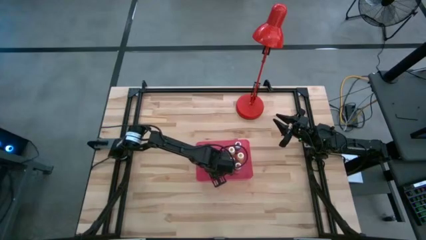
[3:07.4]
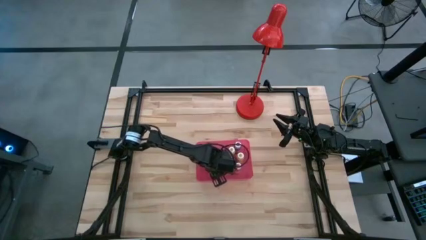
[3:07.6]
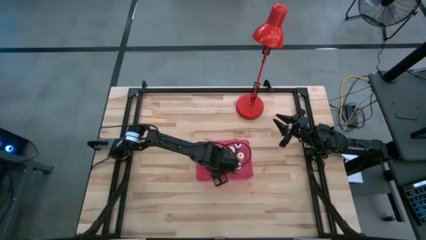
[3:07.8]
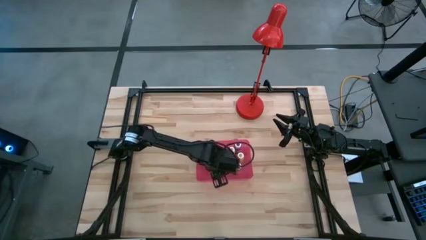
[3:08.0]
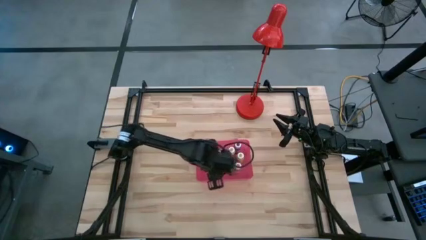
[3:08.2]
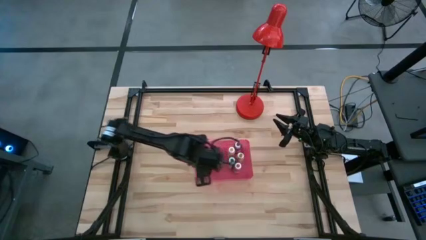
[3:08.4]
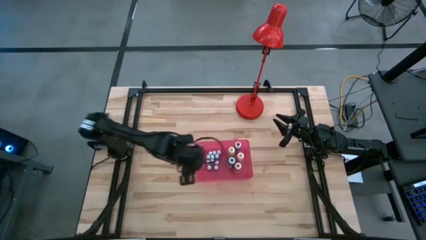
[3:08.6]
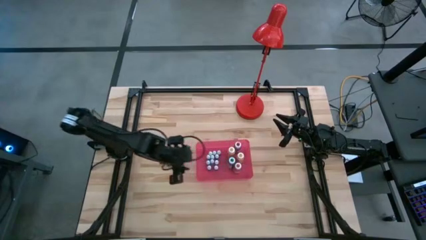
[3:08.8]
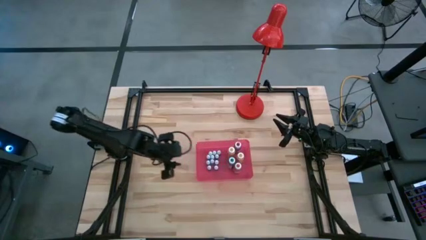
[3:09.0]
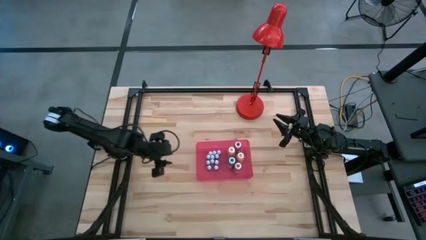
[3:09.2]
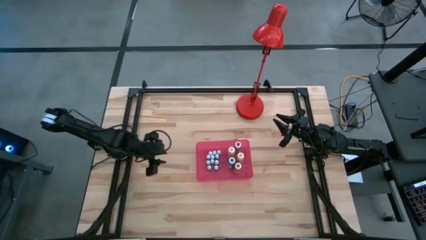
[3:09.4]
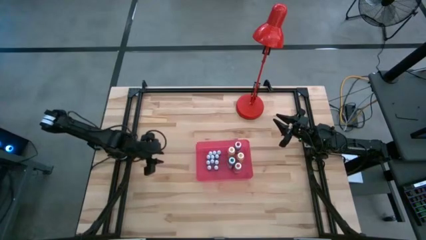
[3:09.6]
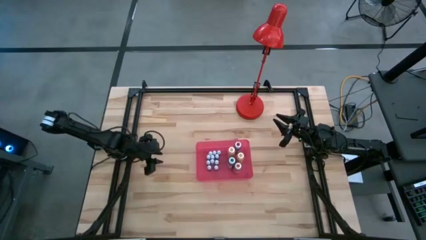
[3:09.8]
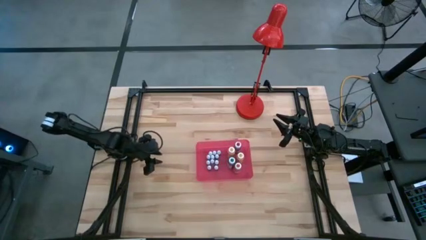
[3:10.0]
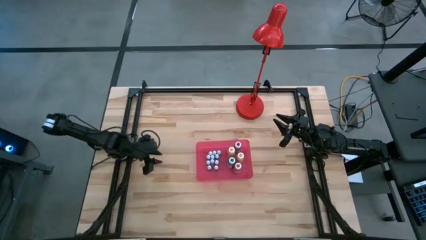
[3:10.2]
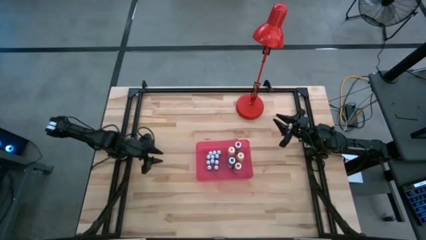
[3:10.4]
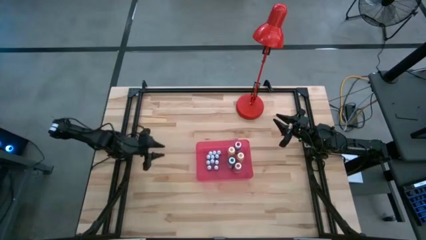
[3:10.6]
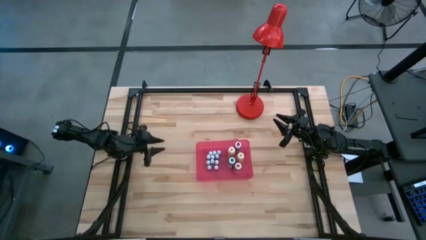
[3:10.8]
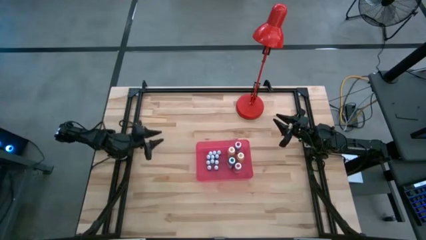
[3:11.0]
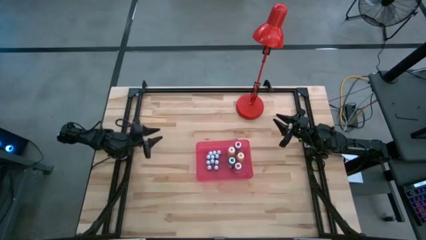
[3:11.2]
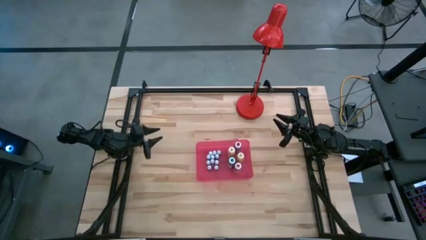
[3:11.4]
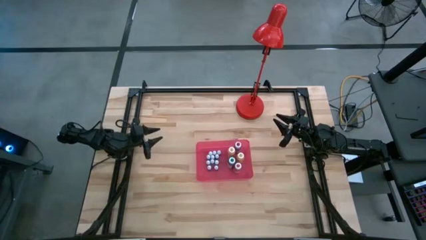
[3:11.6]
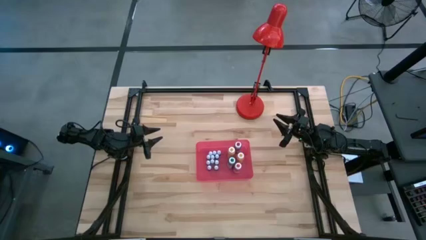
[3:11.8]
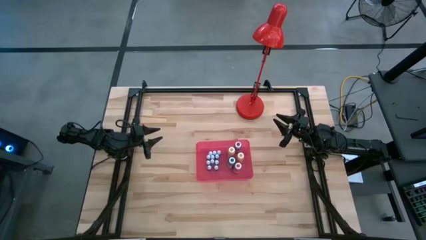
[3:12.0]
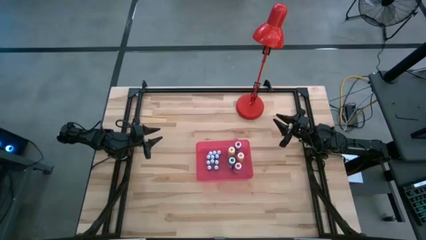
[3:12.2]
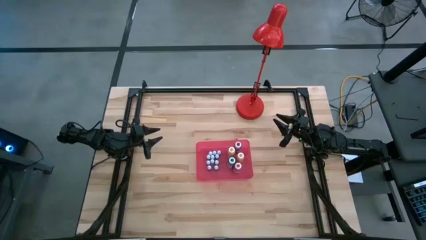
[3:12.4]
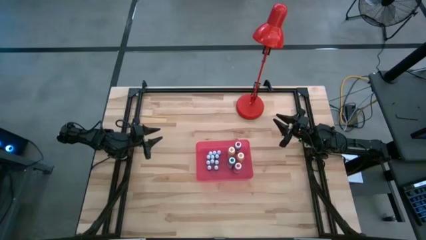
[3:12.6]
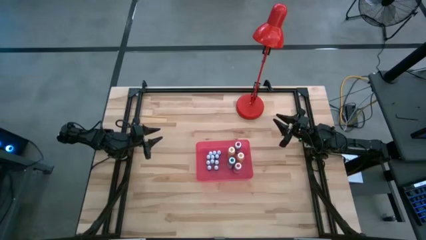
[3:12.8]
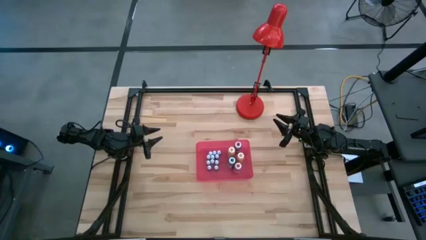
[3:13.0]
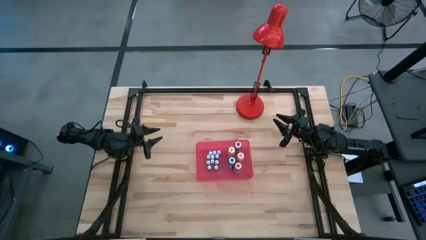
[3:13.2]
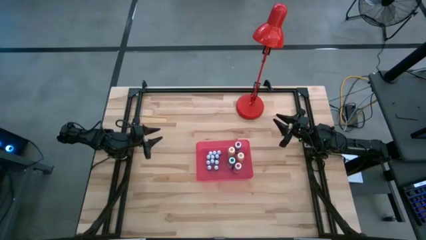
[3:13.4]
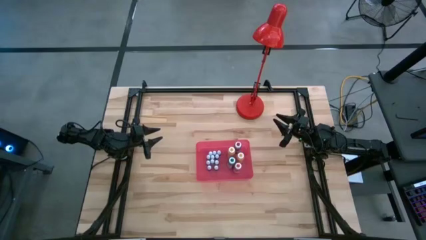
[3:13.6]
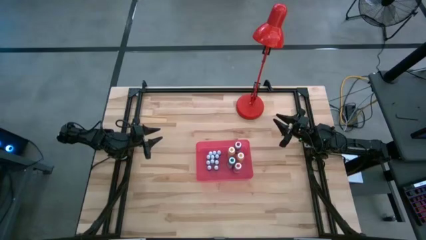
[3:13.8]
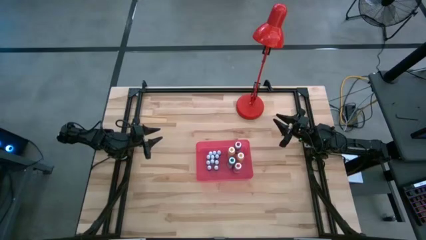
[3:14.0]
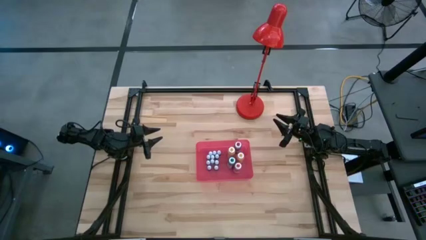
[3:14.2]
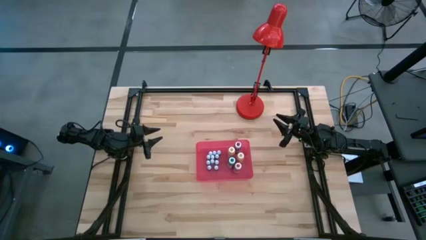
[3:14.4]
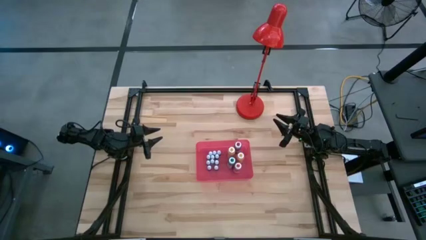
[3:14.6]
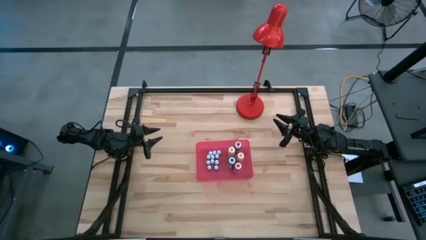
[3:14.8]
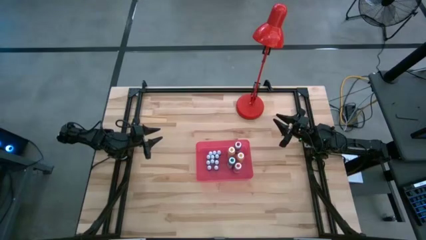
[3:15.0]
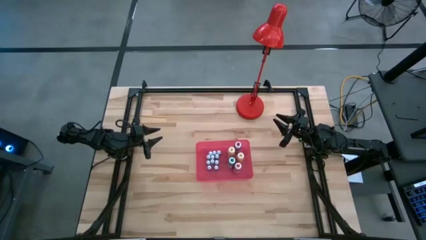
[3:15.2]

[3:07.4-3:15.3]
Task: Pick & Place food coloring
Return to Home Position

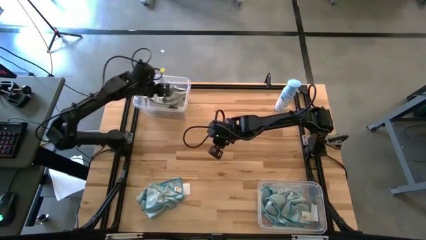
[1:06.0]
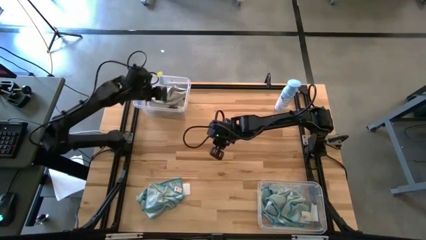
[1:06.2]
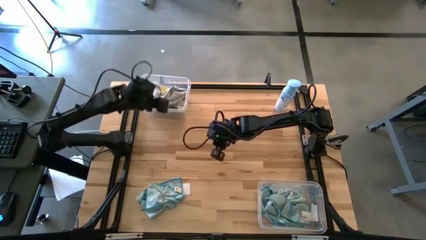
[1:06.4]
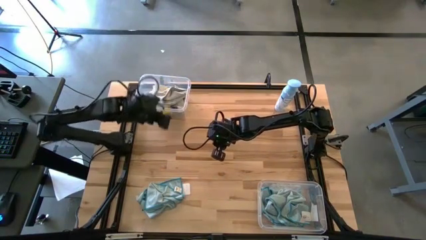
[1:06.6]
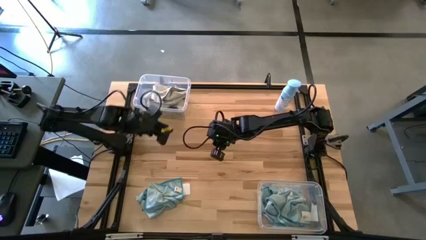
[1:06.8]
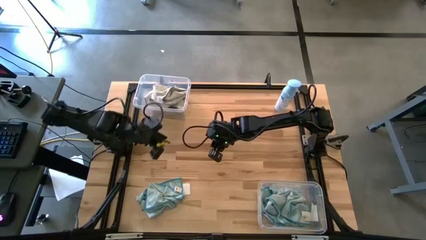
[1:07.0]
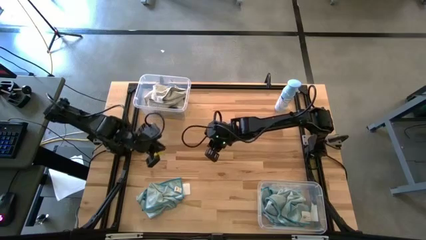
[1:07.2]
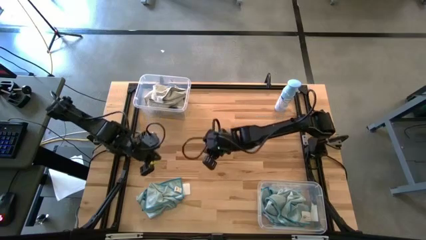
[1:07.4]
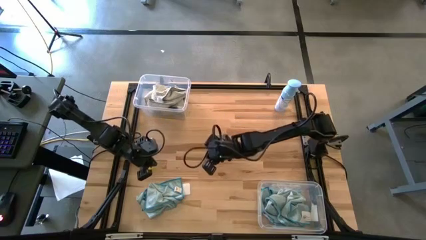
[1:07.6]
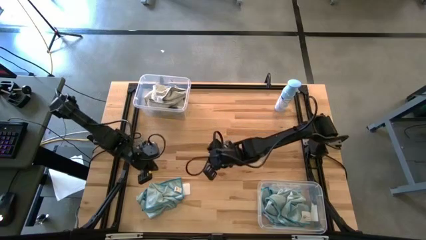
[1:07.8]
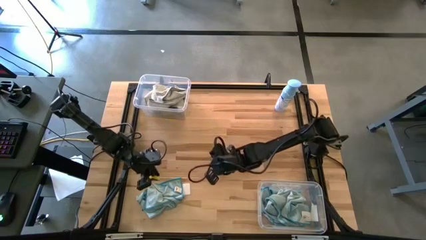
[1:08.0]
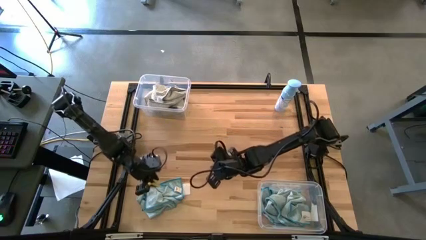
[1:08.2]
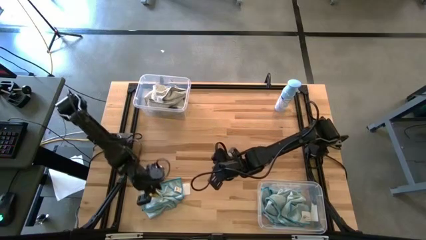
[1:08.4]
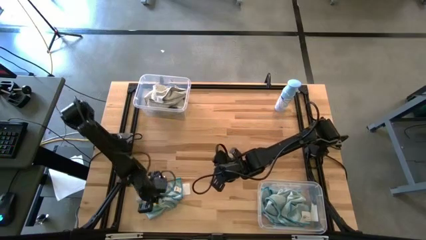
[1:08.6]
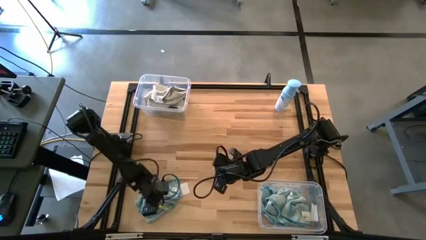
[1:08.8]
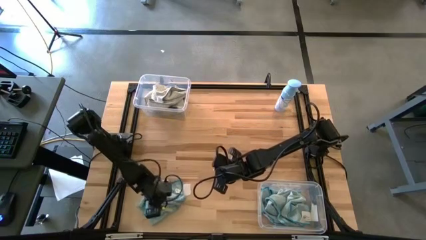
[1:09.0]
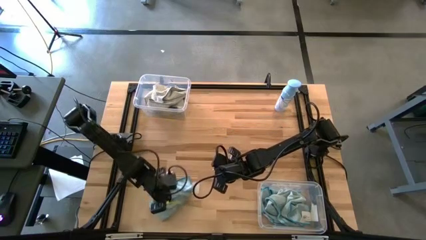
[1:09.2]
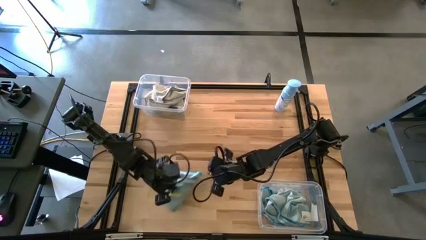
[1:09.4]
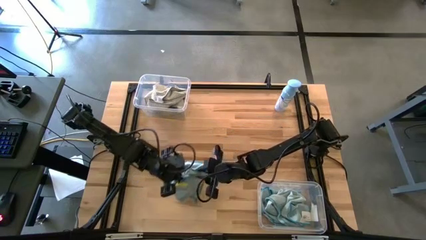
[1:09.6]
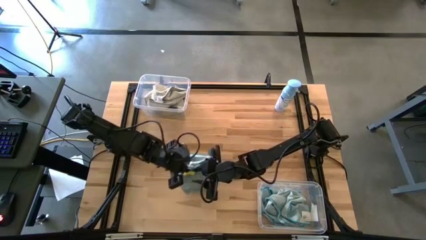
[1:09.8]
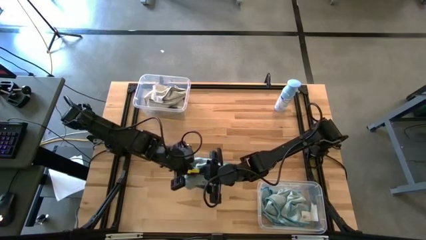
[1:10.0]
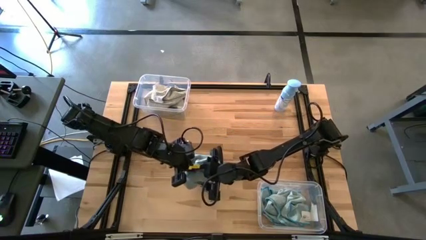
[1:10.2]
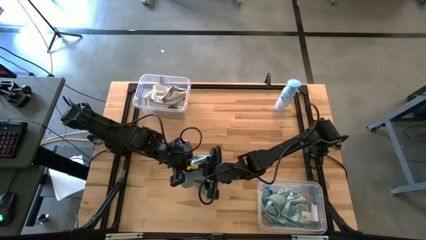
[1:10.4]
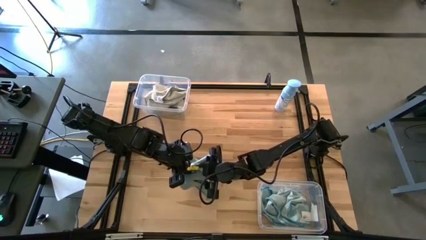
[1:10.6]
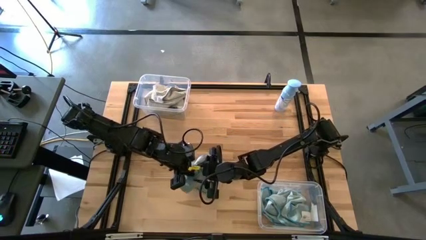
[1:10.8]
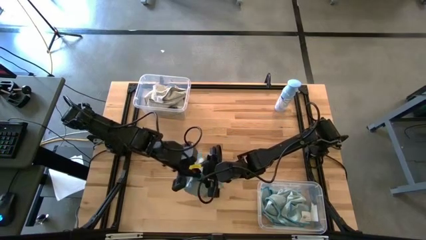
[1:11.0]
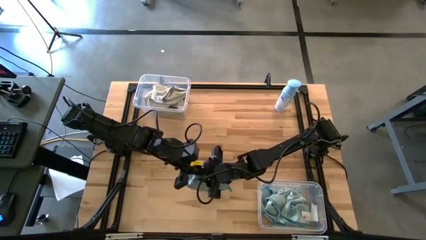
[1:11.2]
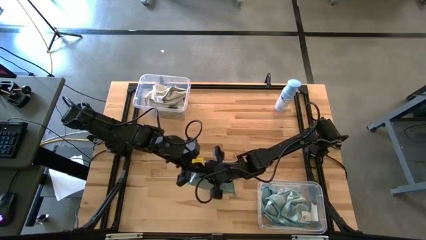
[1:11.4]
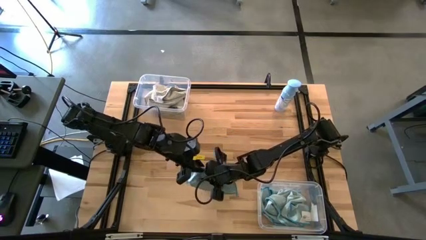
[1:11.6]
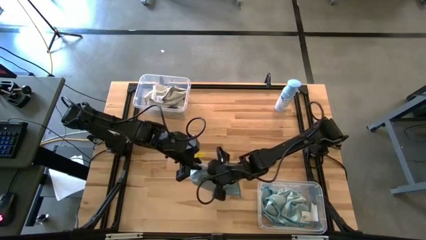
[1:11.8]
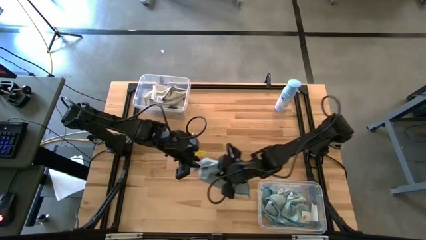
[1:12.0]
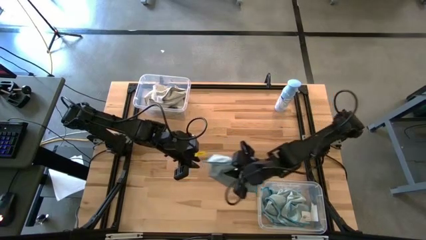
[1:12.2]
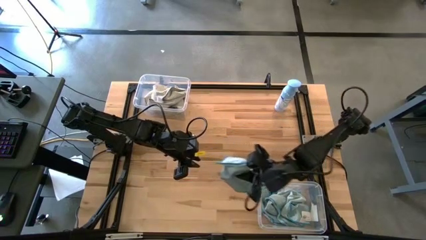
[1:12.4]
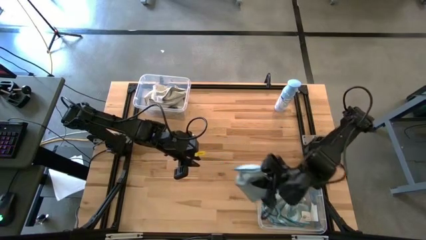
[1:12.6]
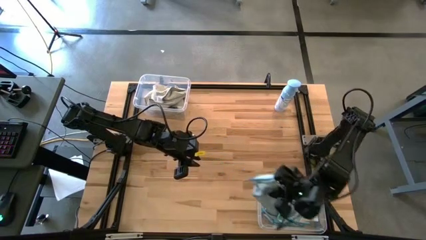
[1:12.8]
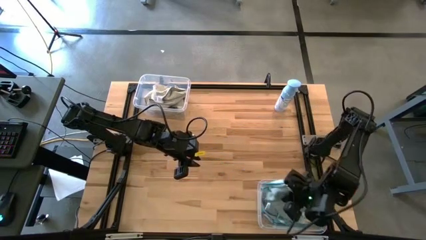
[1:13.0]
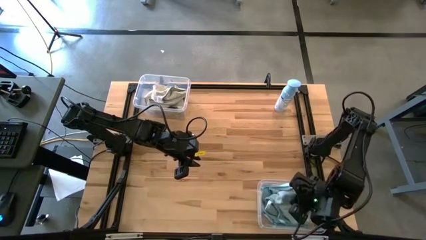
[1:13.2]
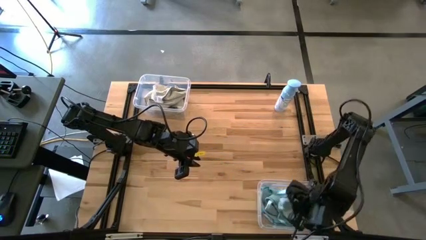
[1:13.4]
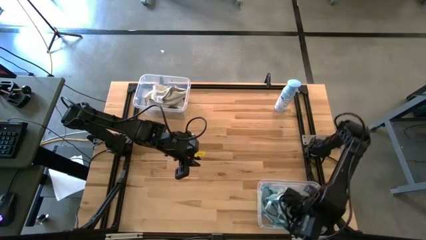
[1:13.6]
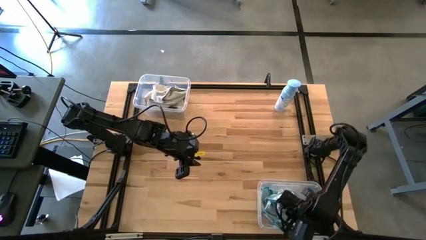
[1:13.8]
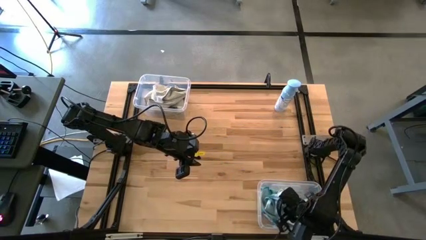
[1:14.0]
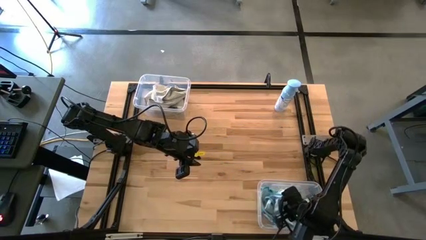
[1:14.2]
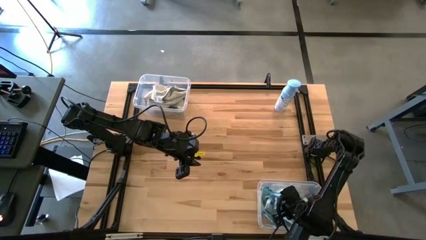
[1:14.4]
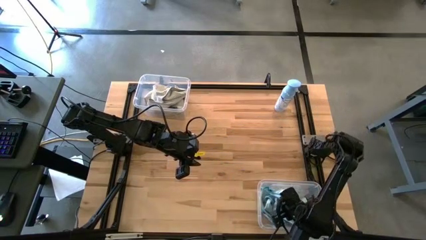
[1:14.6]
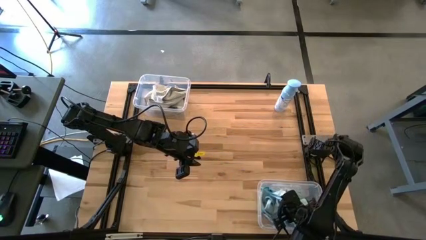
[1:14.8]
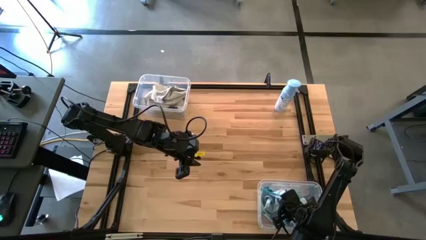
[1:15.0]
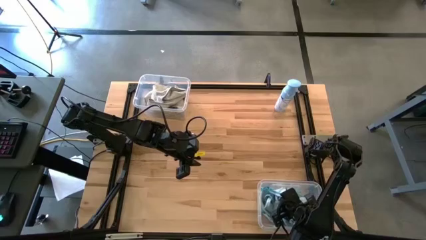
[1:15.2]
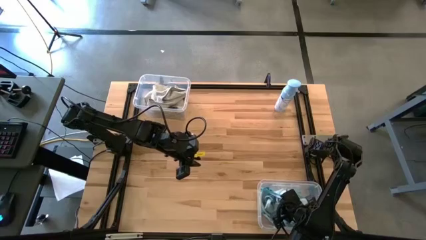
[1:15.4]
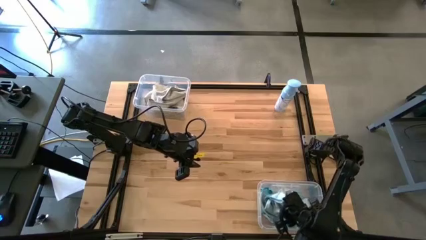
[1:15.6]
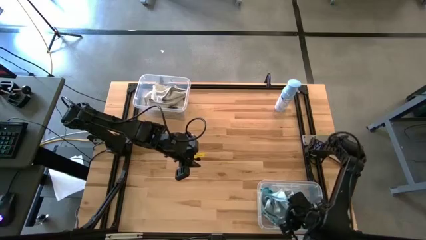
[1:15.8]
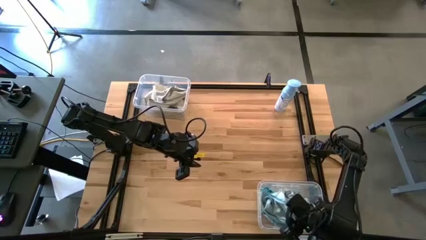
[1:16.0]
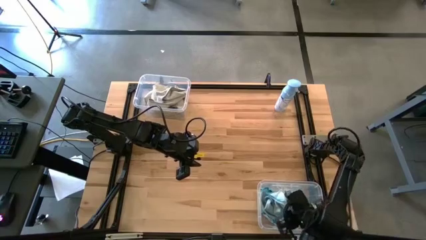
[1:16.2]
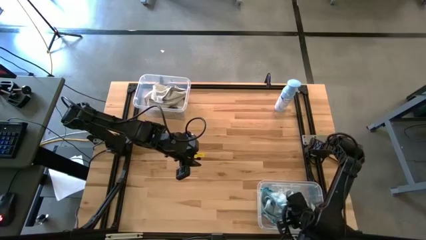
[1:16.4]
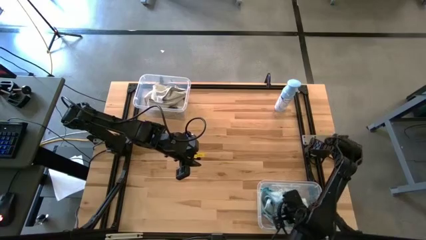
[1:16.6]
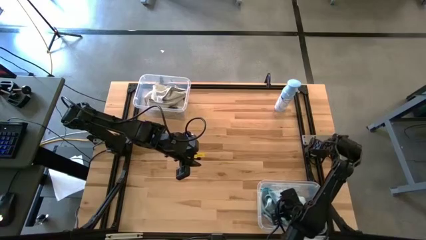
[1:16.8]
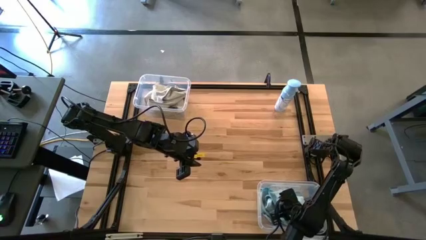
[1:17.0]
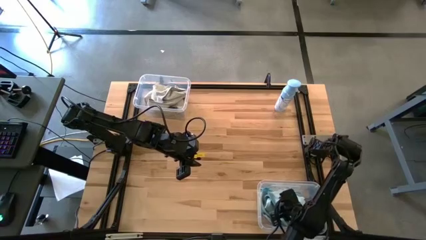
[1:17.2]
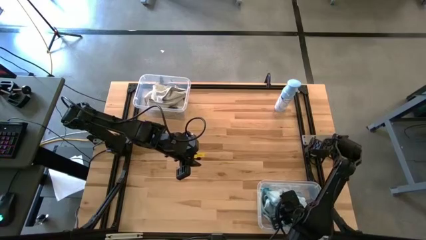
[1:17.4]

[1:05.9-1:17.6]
Task: Sort microfiber towel by color & place in baskets
Put the blue microfiber towel into the bottom transparent bin
